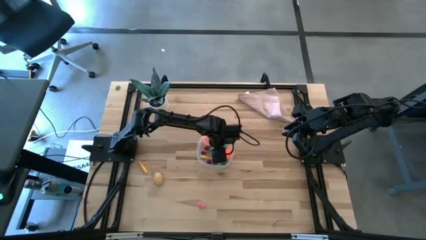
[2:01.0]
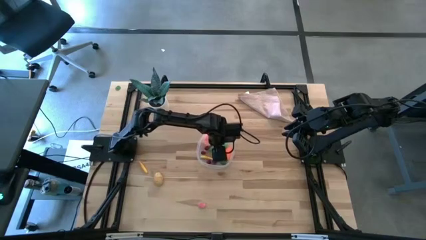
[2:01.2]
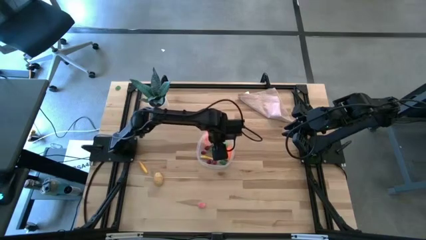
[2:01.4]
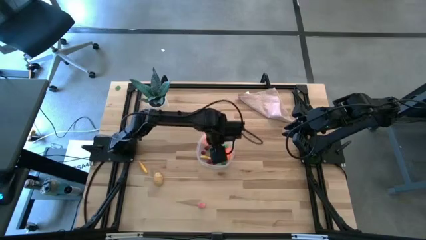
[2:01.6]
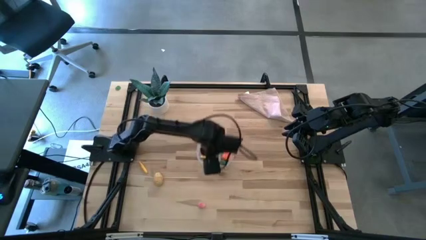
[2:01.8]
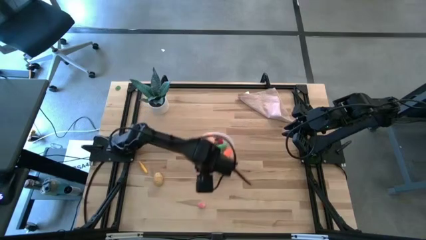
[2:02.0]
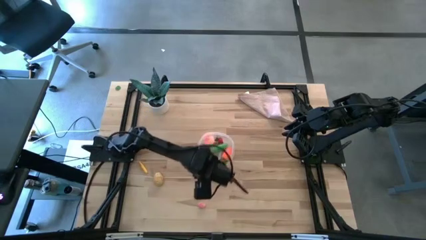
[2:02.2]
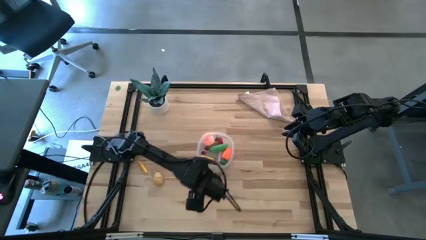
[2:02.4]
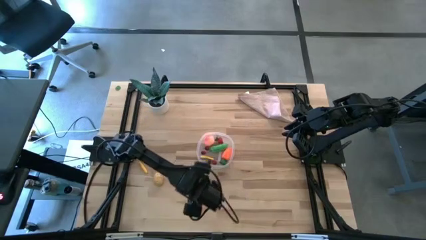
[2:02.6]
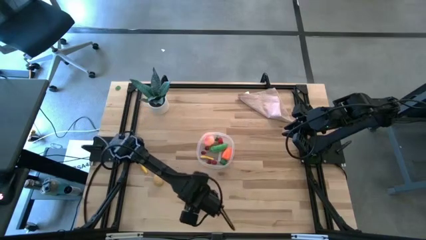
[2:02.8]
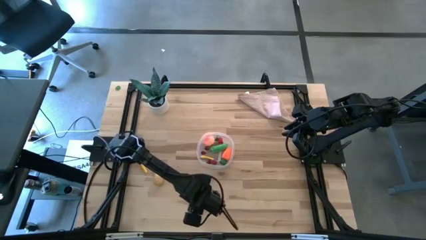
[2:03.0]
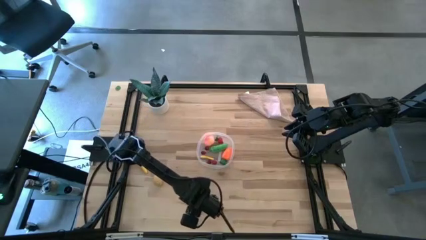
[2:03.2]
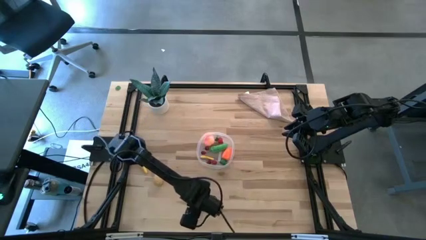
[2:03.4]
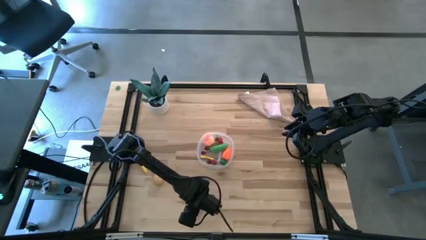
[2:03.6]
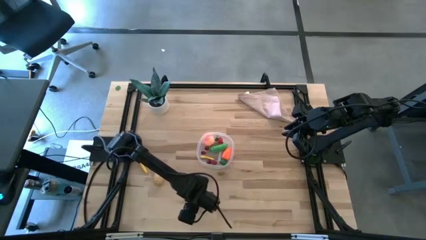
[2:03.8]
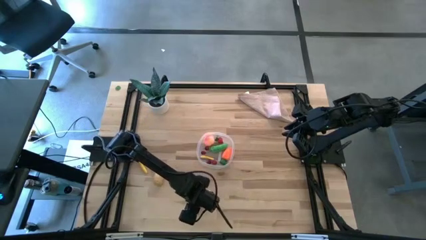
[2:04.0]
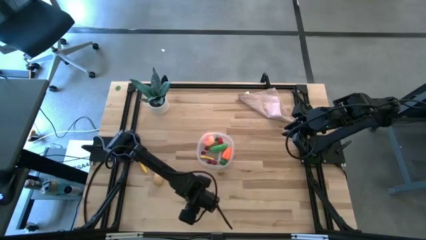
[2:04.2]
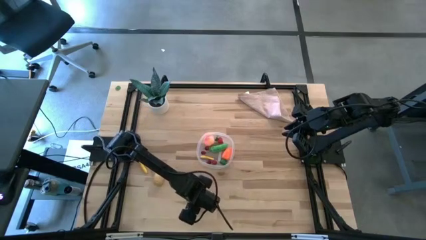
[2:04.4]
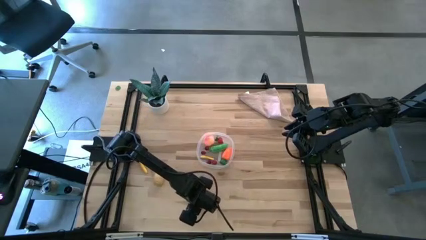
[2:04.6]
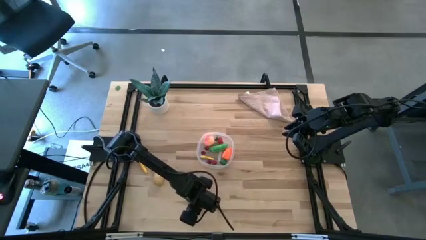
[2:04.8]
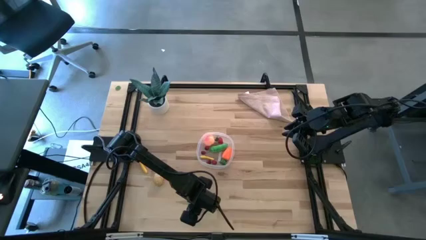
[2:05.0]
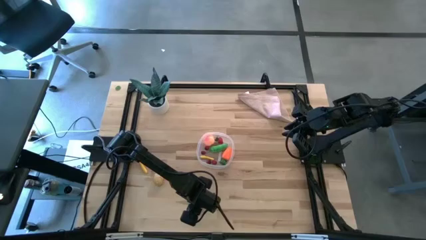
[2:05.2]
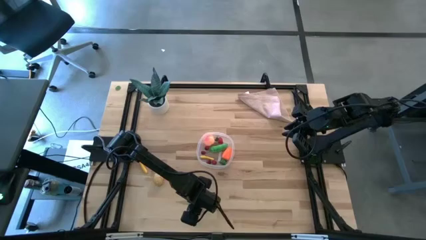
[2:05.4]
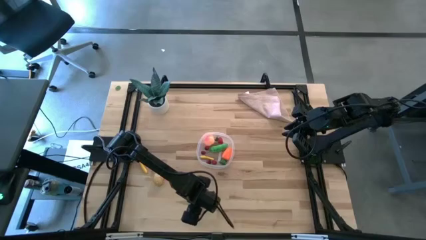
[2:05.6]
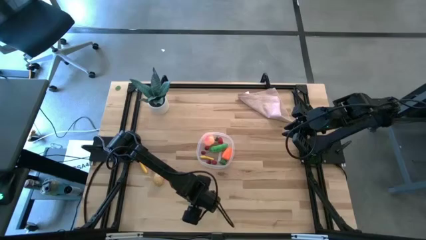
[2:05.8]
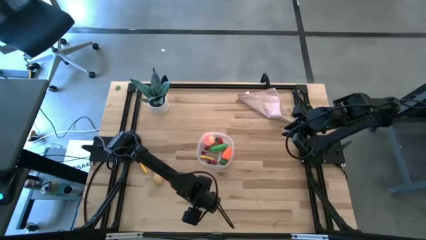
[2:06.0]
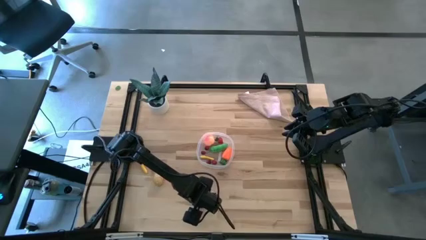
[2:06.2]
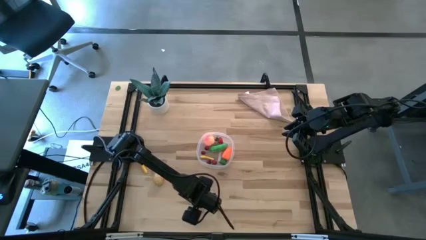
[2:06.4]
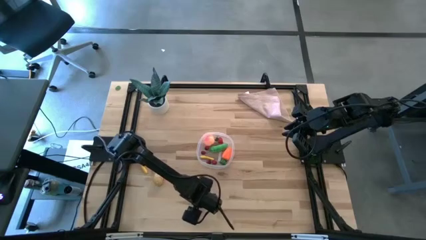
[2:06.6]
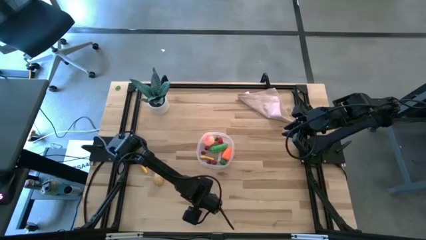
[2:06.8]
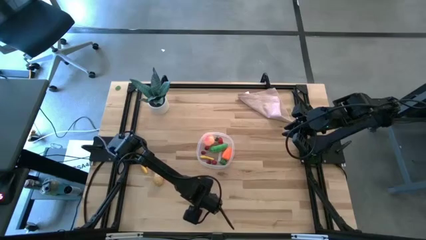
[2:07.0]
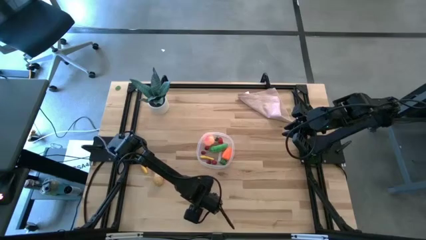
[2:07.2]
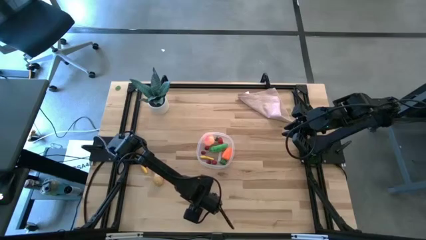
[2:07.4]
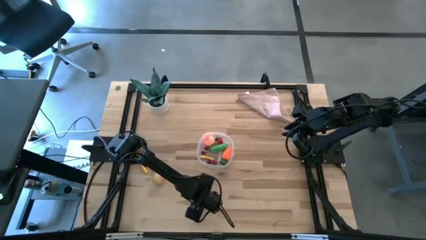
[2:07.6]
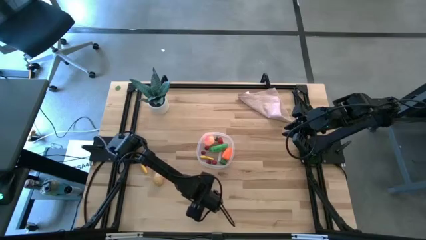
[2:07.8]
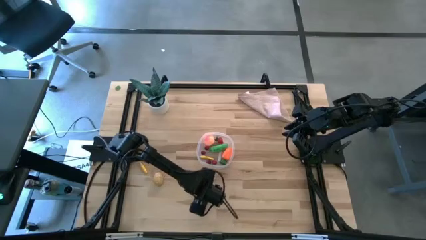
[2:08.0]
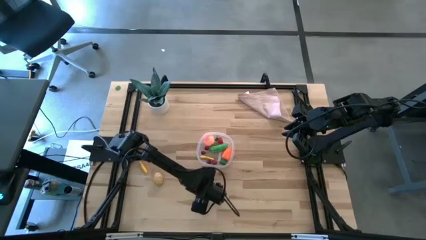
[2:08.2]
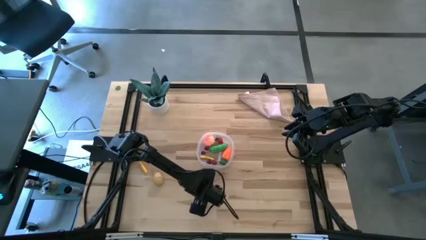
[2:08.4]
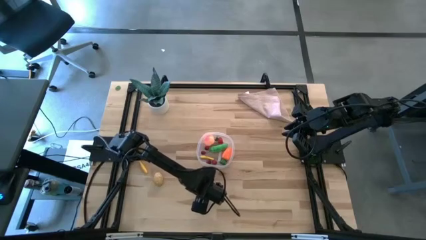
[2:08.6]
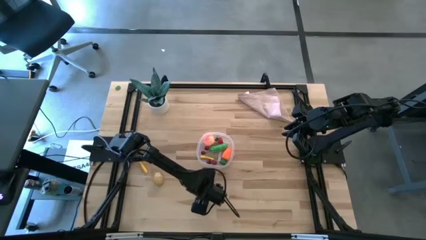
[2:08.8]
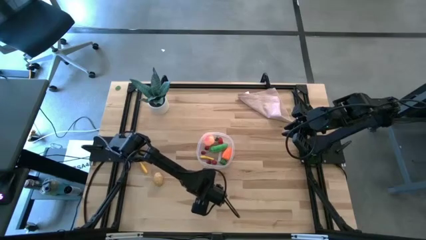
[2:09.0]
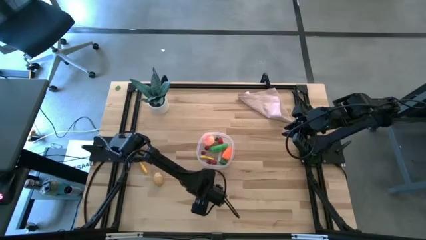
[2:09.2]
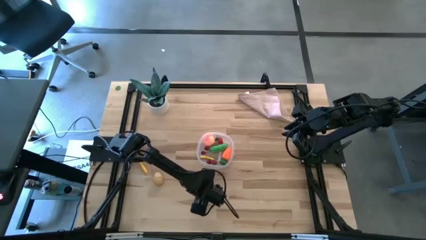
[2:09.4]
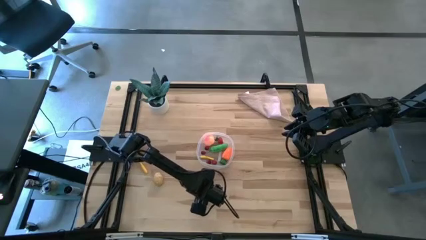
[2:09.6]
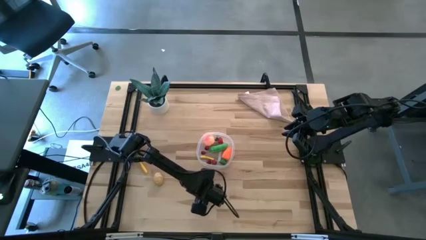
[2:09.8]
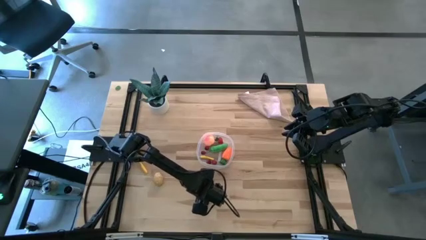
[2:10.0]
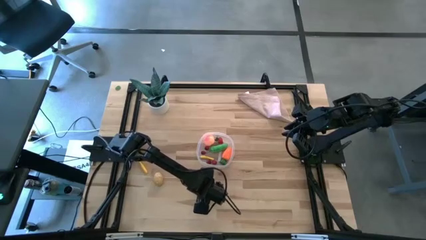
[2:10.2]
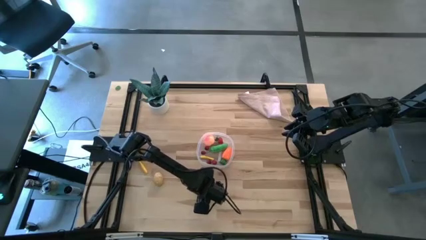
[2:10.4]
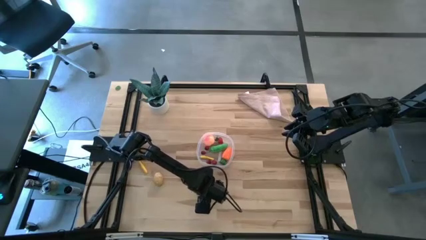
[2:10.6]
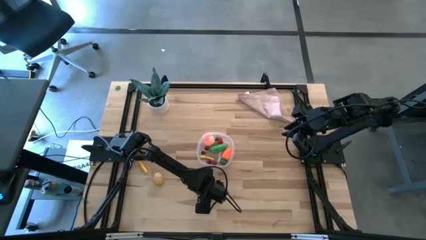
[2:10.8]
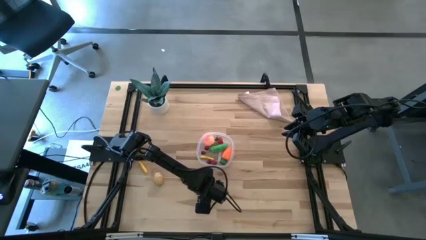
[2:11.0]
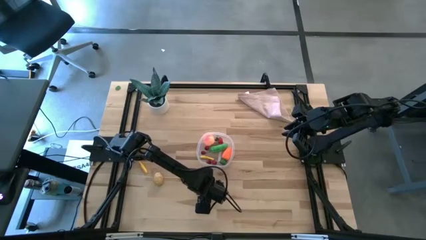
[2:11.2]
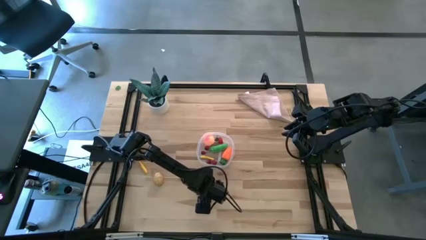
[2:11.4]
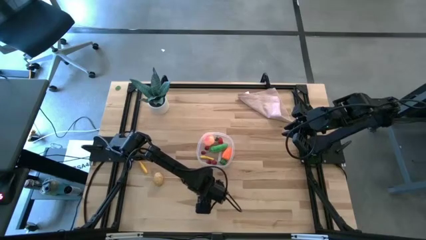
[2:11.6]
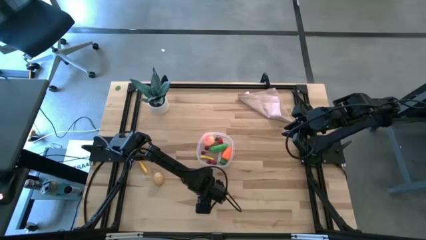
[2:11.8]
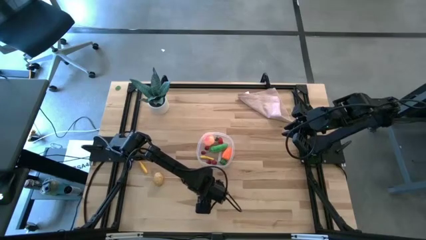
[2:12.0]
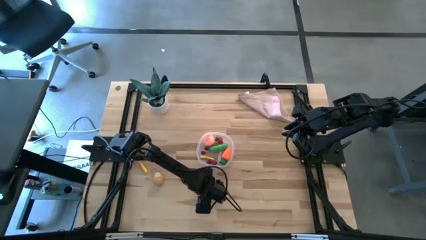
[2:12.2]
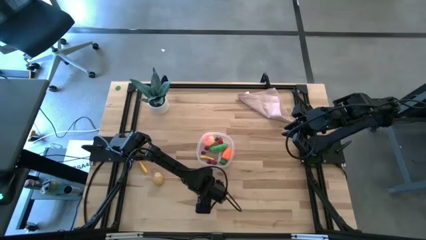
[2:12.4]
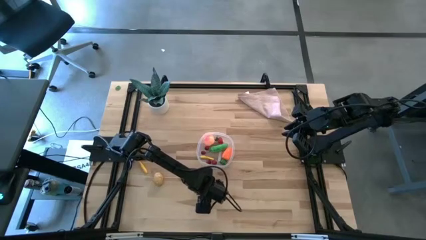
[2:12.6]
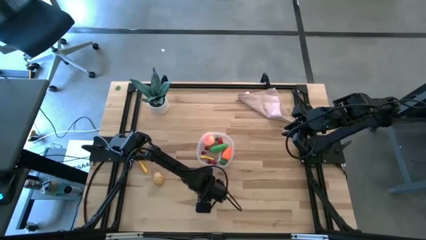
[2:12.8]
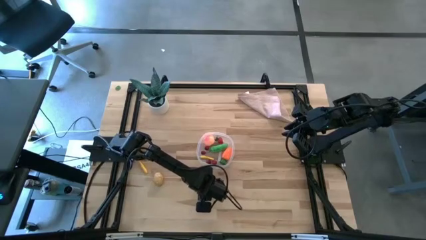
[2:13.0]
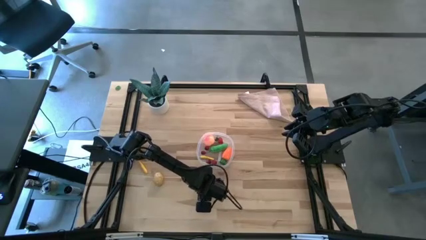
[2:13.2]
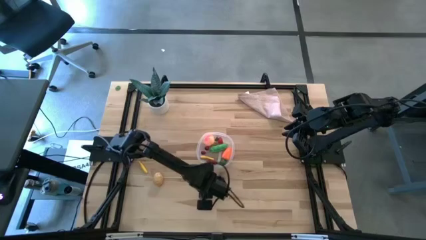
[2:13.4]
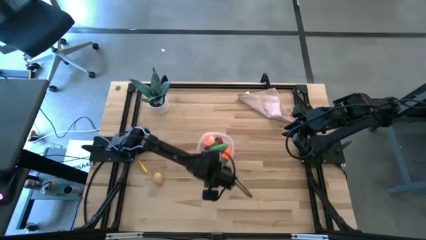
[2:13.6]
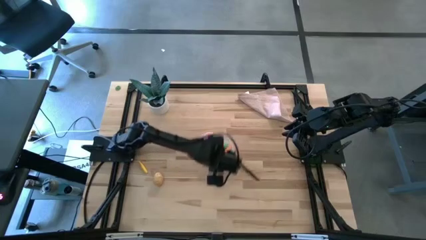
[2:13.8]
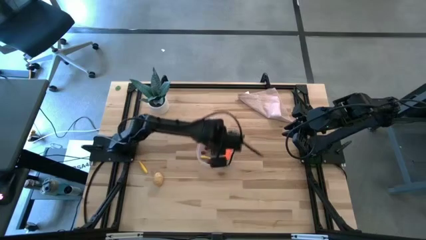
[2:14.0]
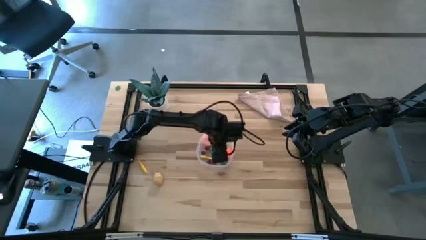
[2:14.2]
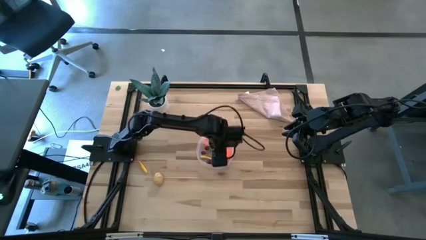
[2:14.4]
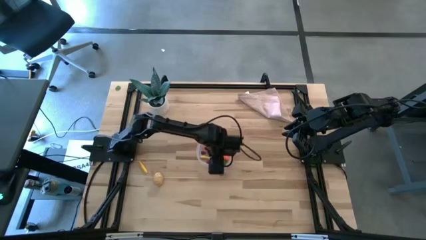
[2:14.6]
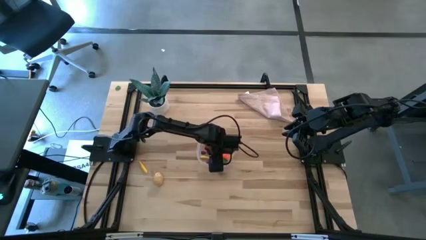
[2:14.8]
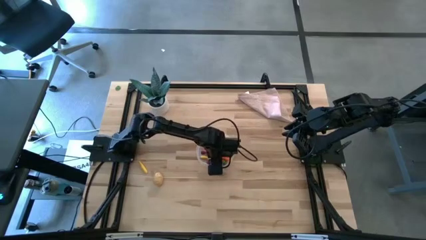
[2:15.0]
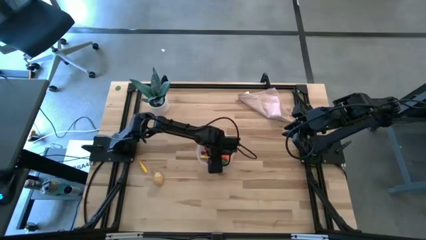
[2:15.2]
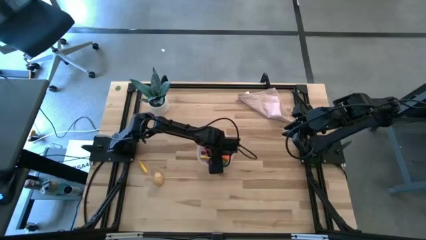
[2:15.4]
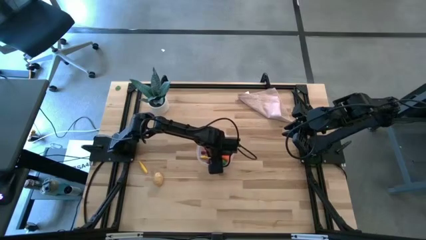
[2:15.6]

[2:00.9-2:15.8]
Task: Pick and placing Produce into tupperware
Put the pink peach into the transparent bin

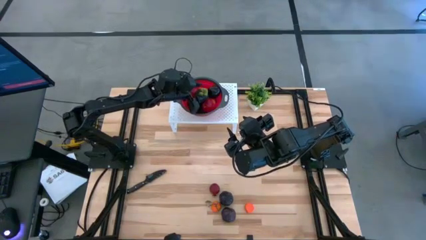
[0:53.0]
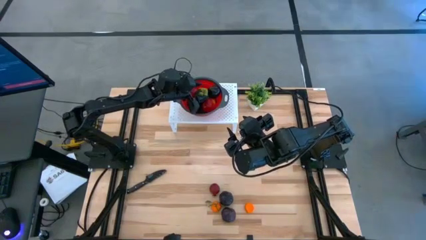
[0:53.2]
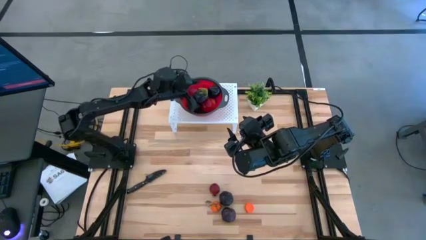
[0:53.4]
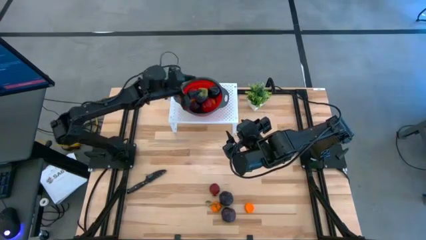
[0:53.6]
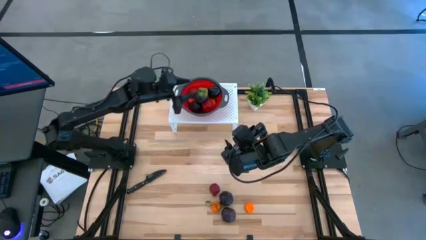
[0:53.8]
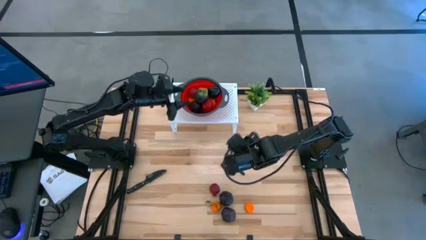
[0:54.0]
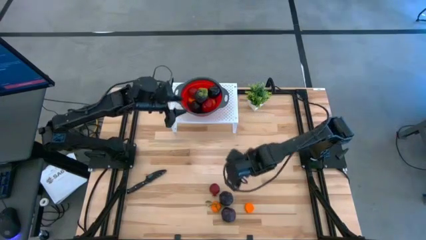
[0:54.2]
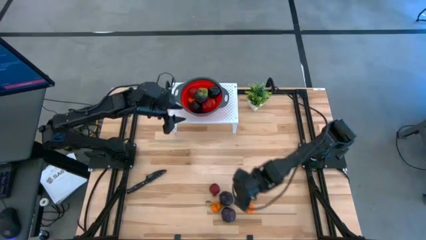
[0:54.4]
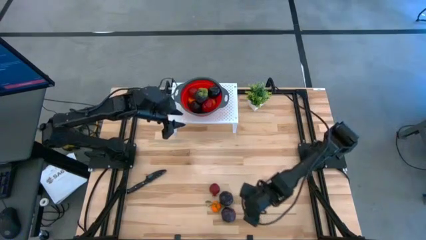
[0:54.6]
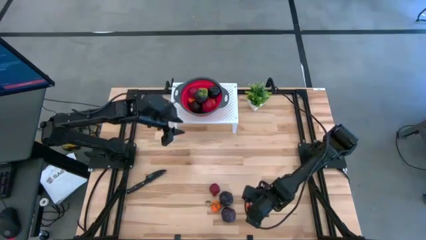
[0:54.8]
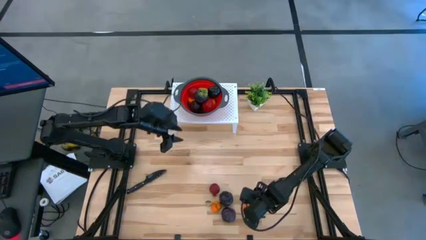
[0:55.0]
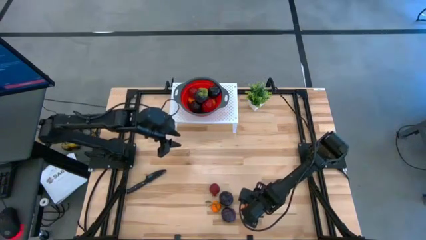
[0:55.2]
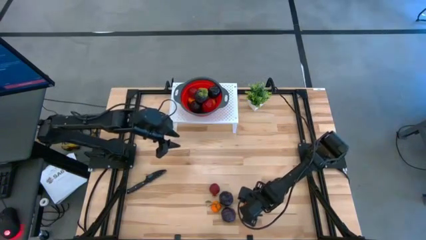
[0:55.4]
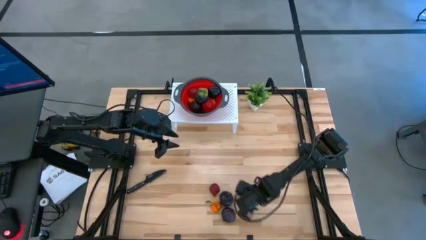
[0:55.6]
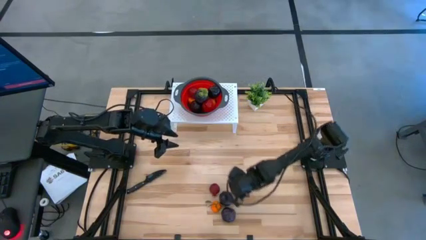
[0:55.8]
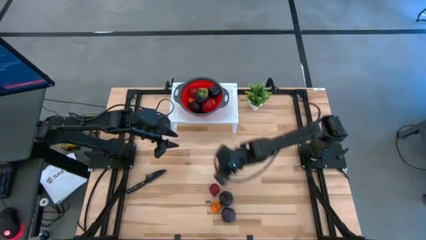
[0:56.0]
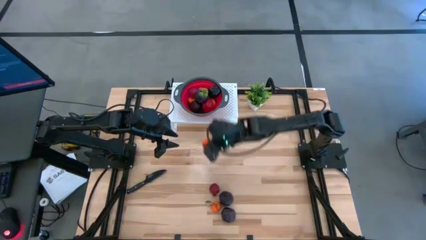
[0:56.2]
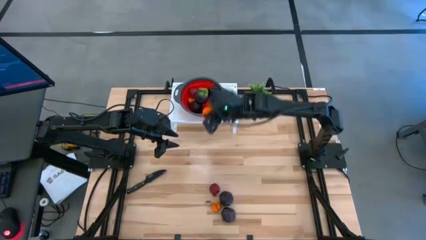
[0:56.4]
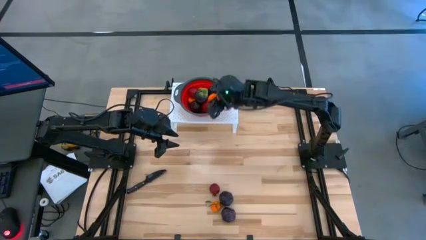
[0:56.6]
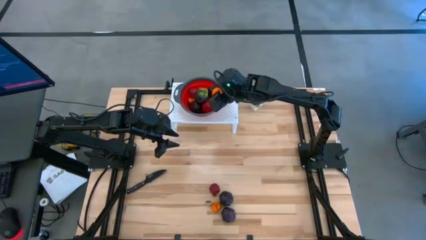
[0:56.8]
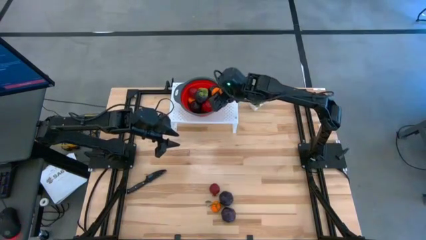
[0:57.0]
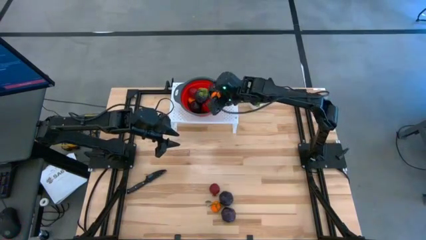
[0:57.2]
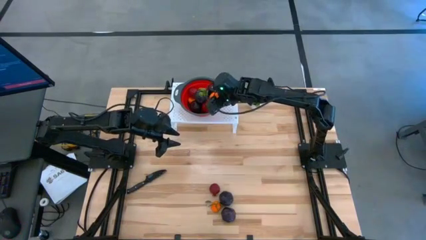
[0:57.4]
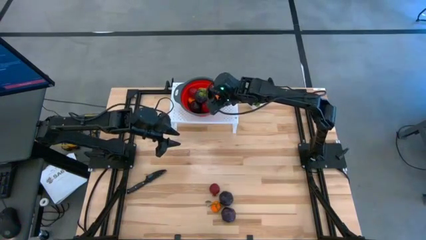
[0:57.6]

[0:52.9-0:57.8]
Task: Pick & Place Fruit
Put the orange into the red strainer bowl on the shelf
